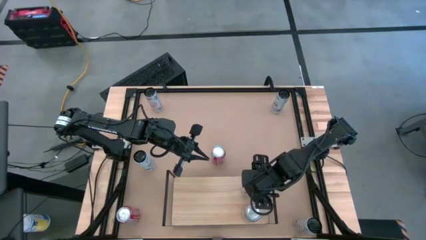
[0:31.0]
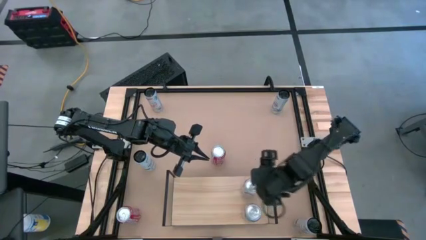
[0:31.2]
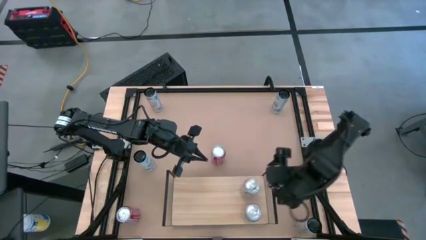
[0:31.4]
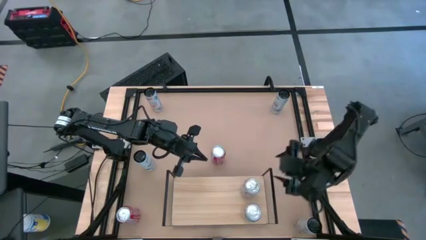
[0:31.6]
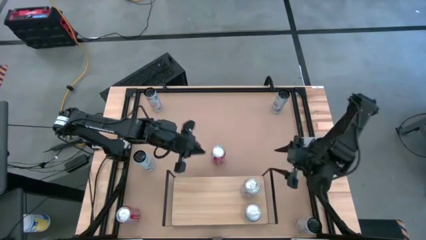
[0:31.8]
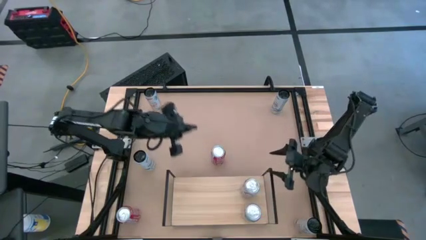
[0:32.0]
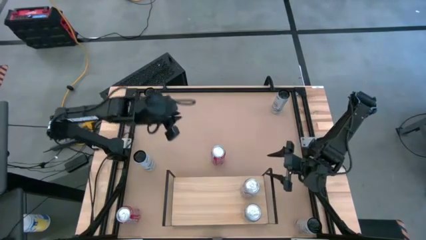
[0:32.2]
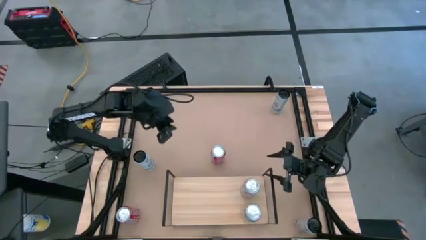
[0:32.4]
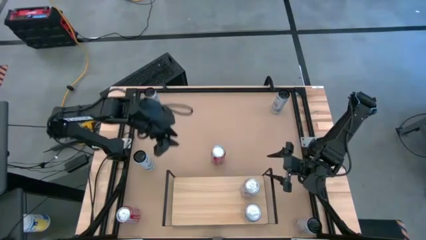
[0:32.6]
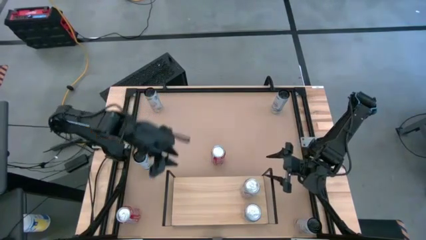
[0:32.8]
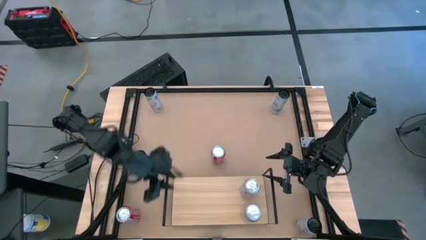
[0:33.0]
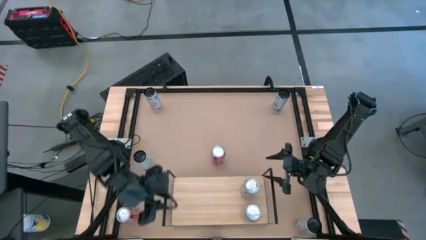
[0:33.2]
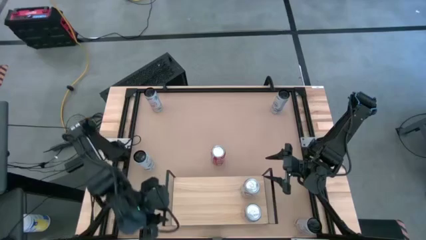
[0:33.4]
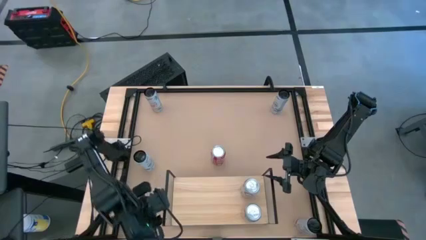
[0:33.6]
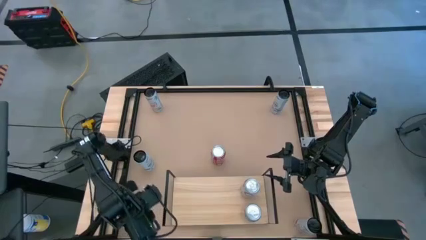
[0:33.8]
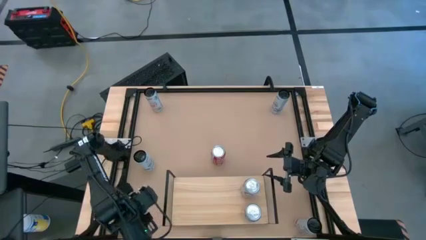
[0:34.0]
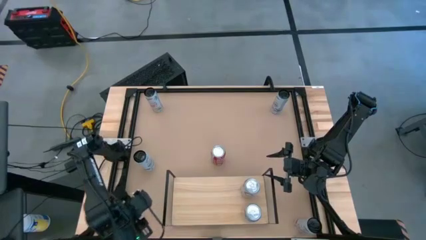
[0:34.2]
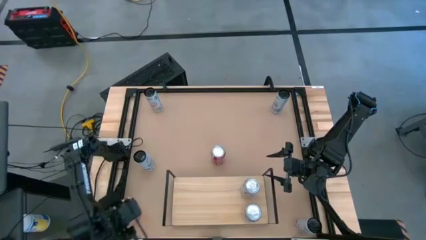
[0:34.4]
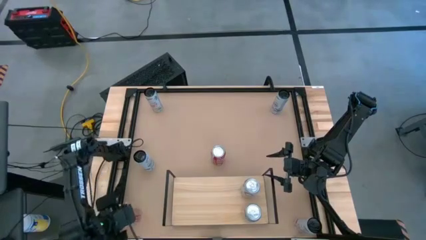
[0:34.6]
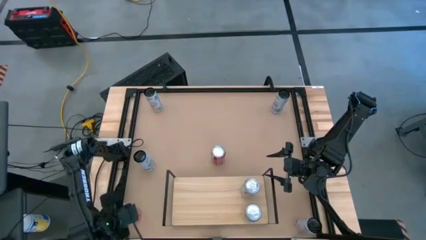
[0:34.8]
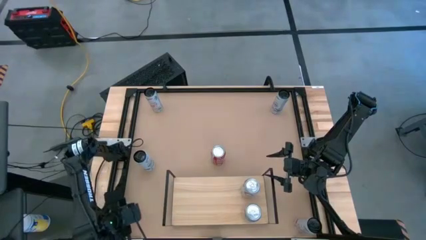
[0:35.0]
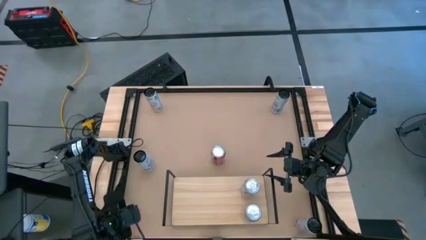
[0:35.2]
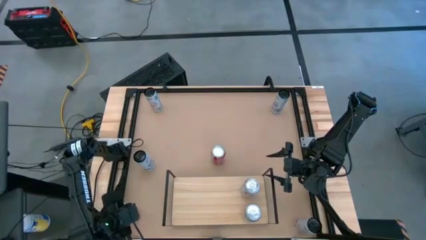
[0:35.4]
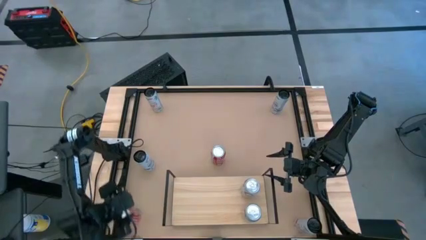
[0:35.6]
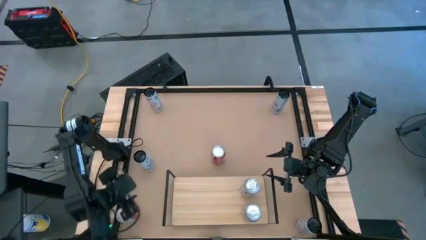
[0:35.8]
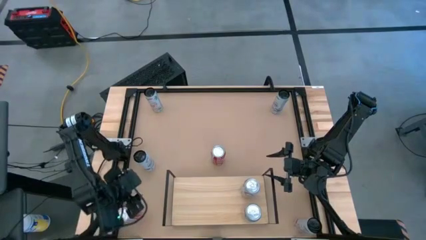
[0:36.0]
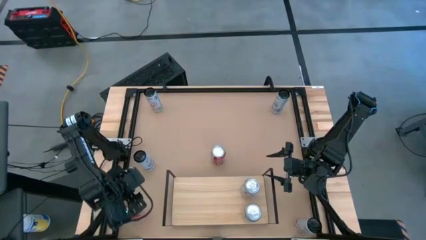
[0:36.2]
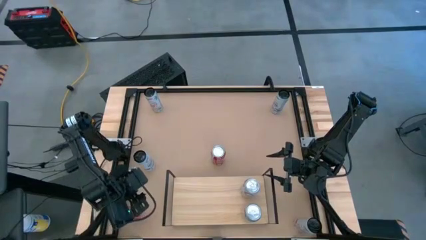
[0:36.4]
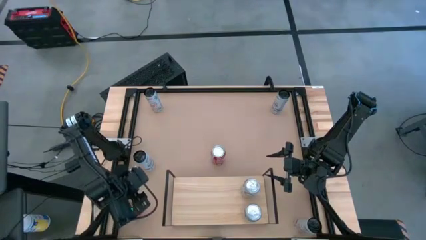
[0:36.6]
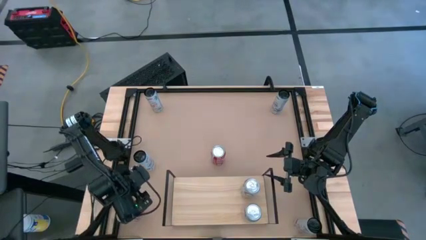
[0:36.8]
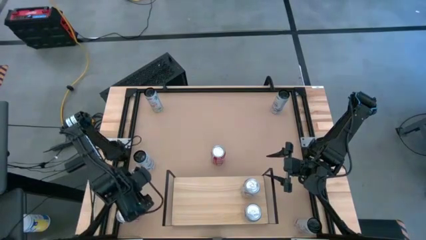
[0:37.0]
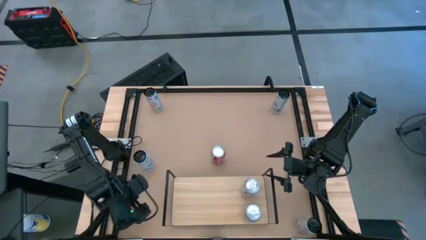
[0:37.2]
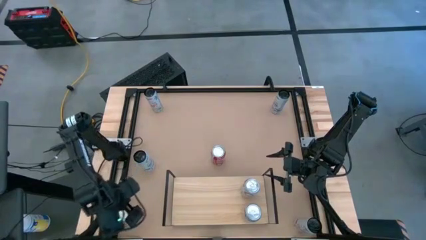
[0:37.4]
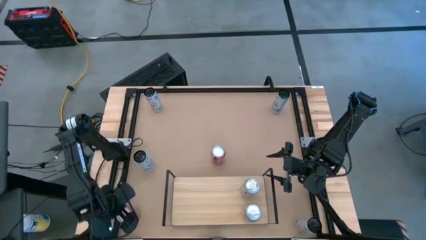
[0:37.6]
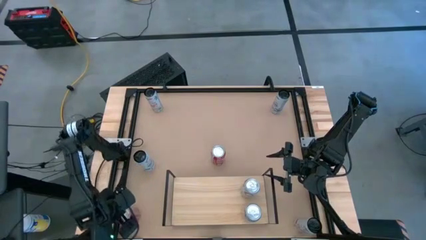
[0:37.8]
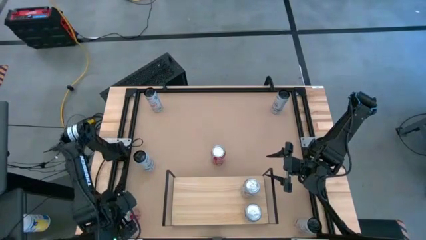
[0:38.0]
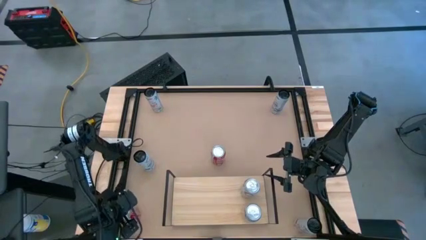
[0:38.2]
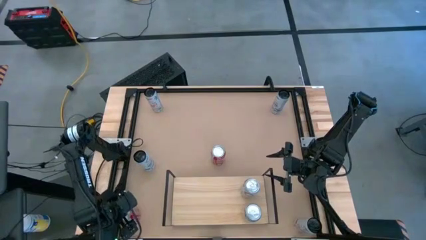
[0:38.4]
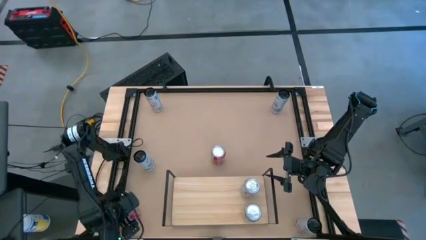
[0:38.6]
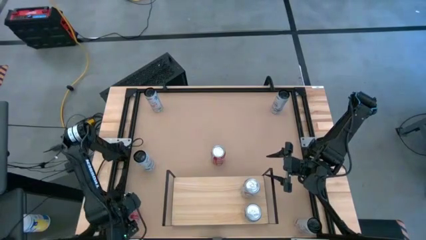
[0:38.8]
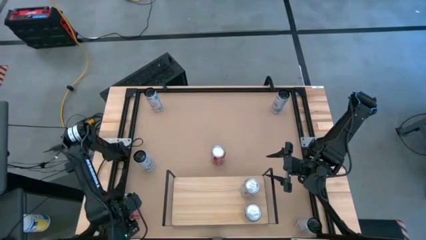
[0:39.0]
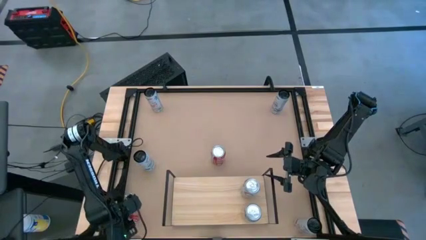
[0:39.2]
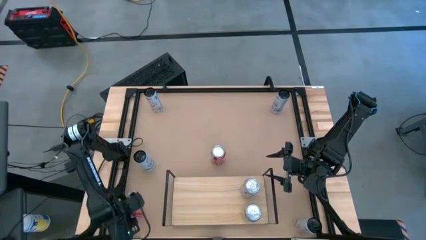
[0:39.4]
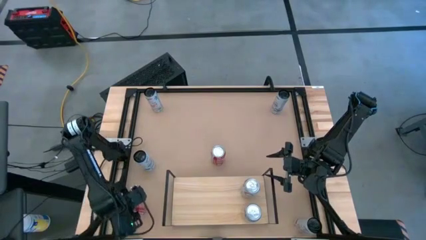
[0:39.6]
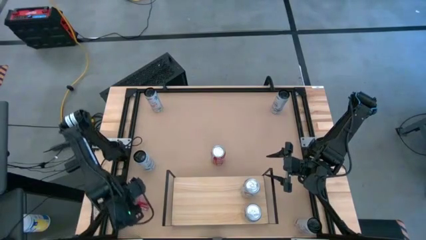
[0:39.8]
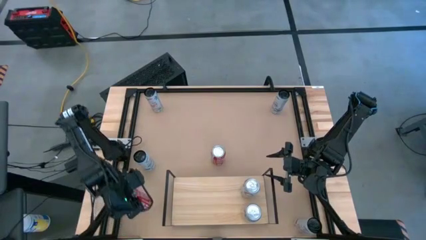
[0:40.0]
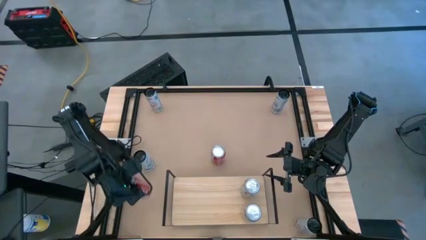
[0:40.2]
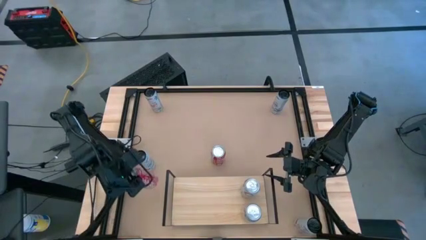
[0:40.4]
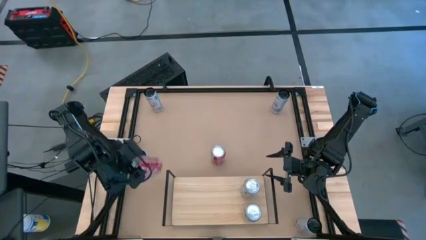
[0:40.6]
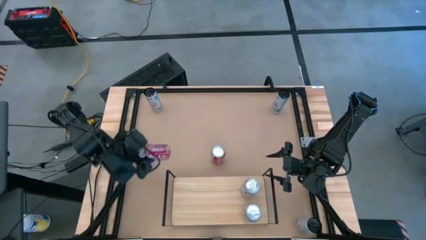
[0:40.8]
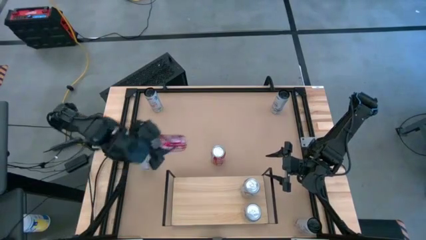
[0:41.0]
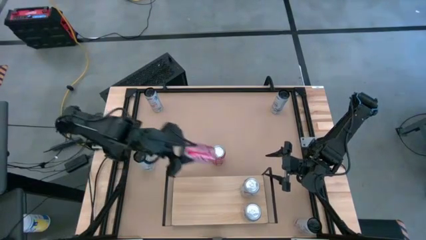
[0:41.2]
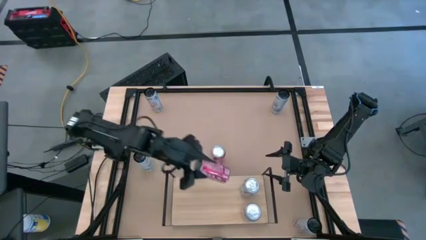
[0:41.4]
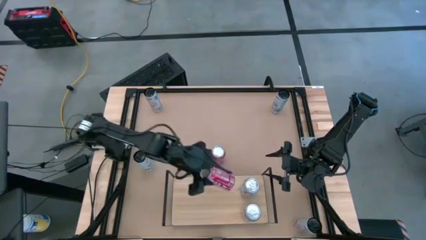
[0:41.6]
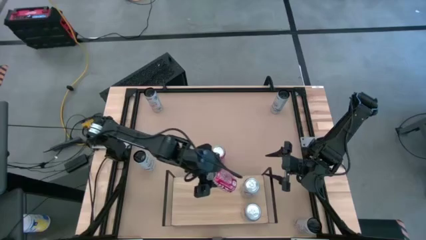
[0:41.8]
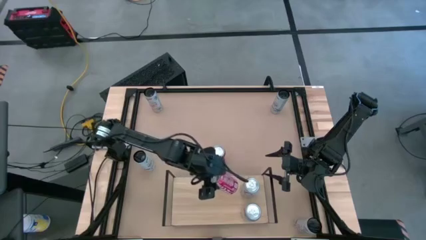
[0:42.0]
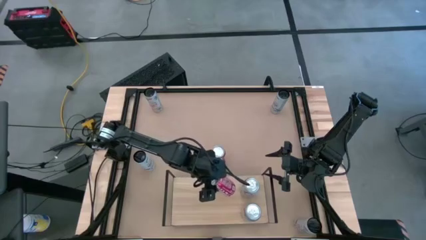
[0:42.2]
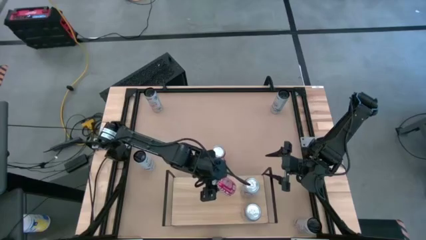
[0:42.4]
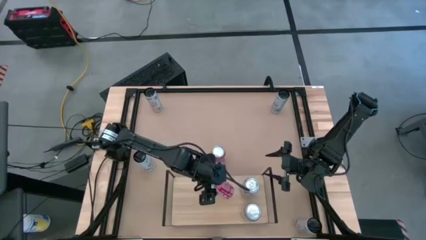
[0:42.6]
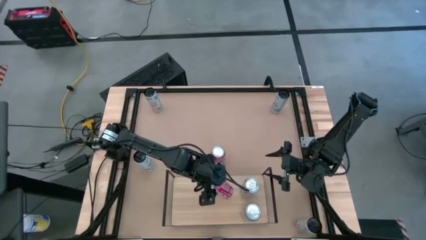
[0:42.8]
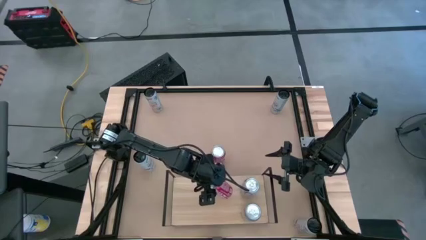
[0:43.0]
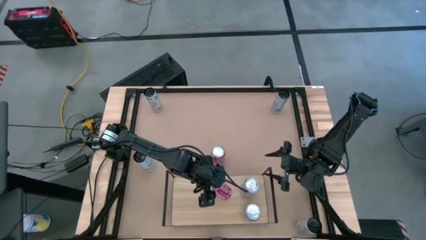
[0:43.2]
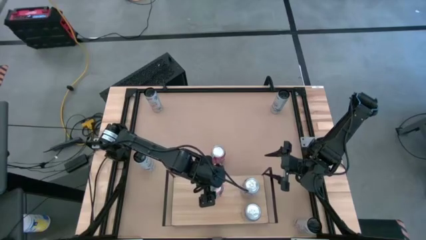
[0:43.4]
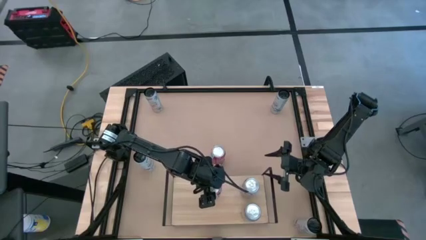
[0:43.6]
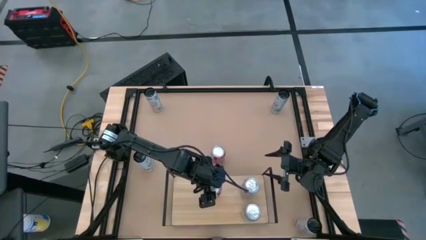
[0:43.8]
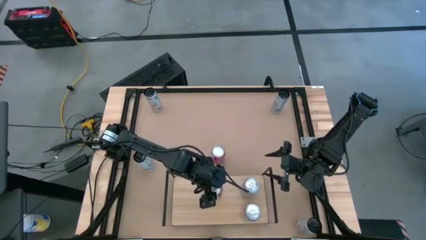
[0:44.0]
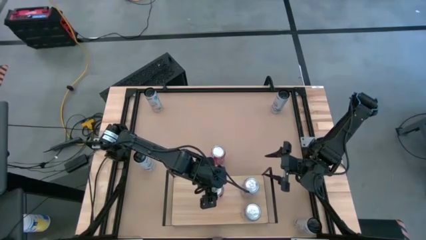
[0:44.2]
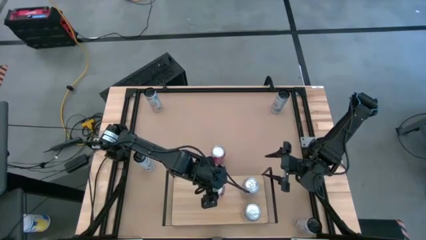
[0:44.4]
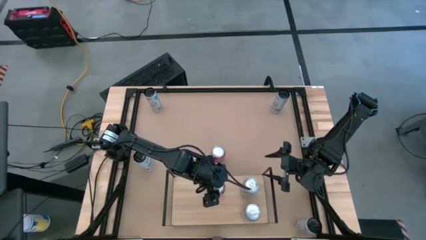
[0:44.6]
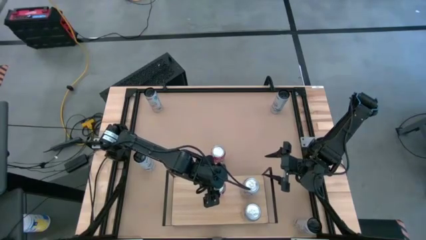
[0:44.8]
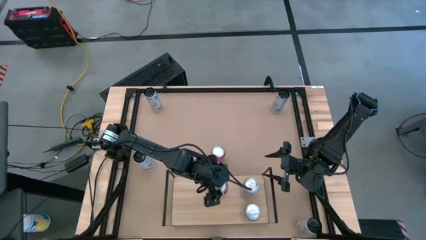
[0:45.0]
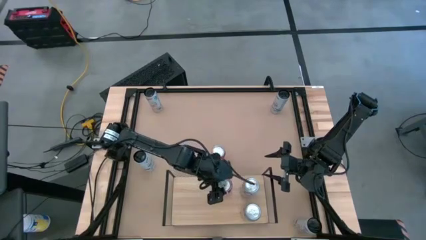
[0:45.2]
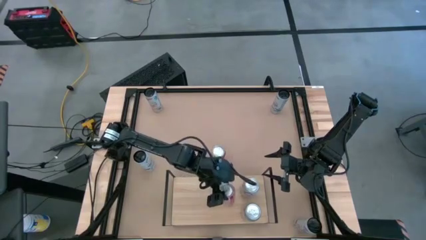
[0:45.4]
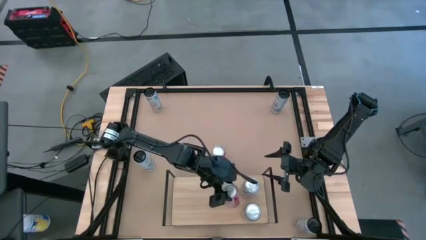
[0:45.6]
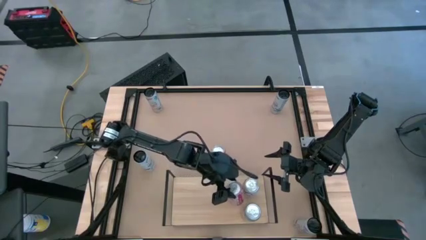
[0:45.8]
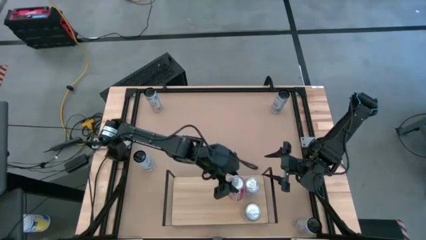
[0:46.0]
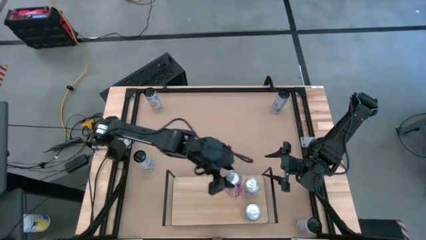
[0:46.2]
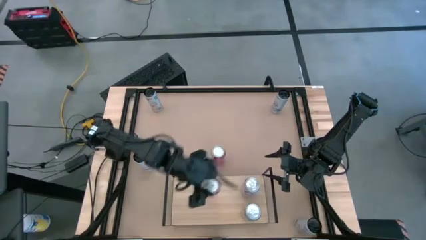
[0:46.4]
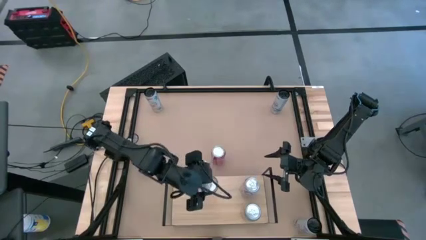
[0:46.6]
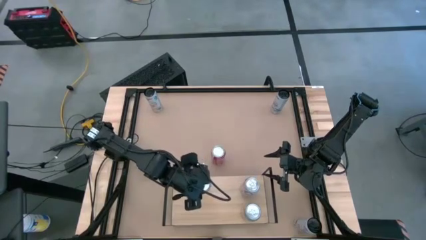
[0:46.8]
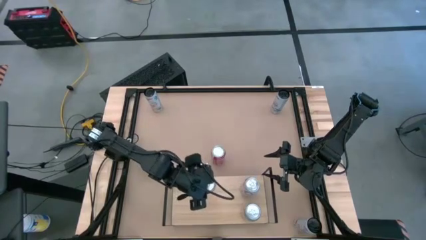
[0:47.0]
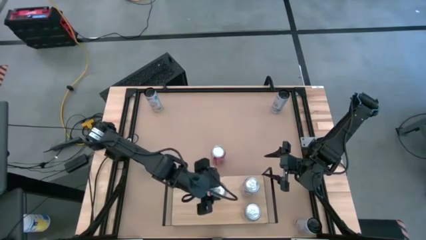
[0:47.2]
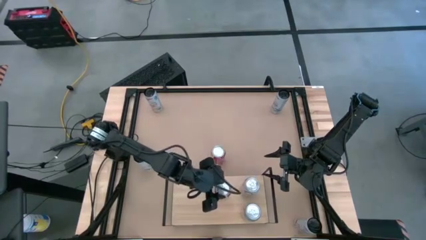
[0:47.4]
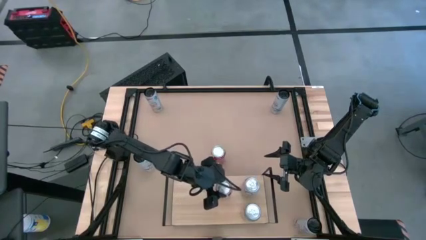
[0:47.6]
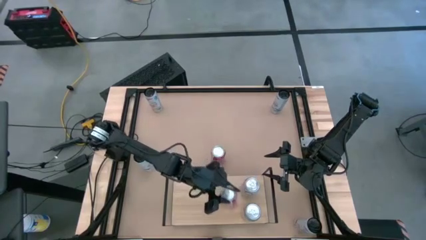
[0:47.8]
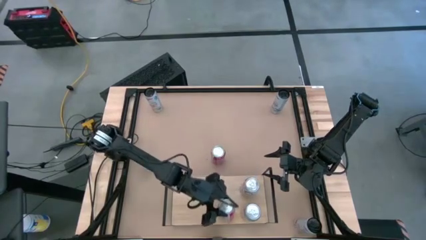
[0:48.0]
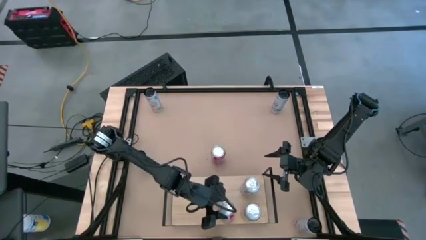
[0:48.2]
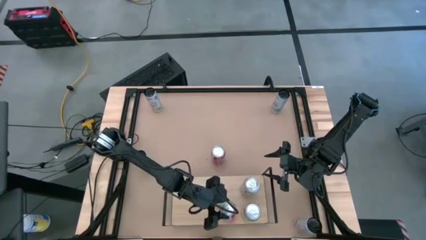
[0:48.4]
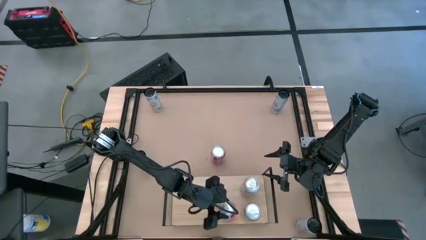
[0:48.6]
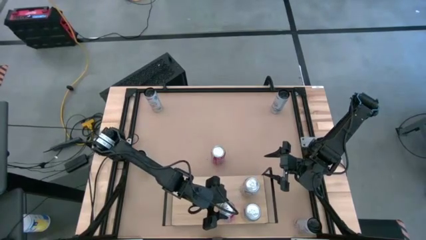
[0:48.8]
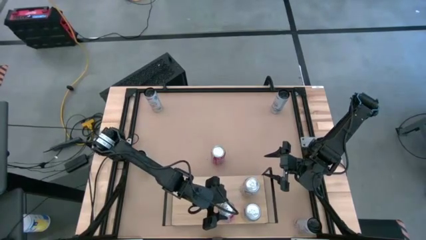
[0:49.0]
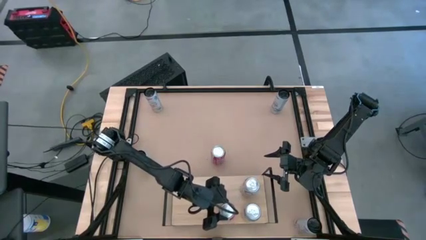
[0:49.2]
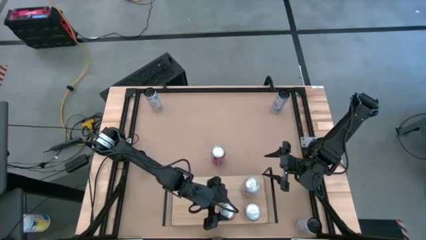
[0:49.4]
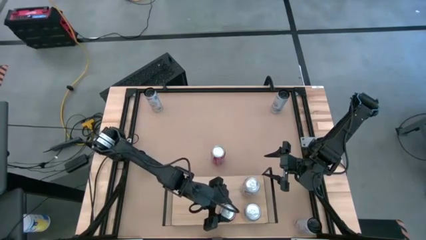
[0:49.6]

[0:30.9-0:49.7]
Task: Place canned beverage on shelf
Put the bottom red soda can on the shelf
